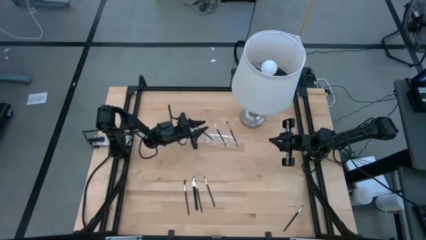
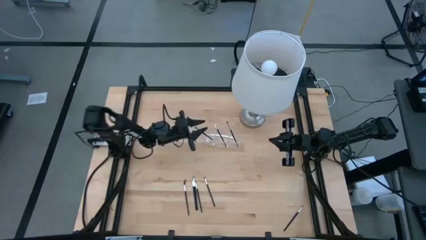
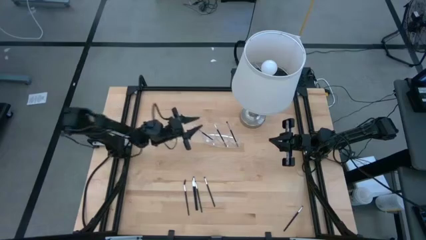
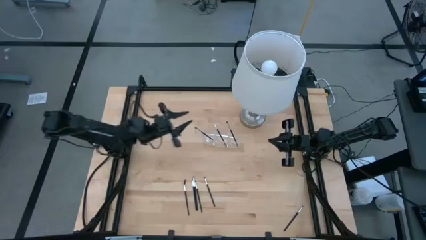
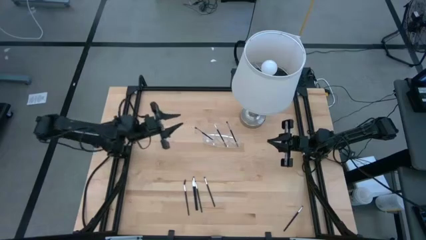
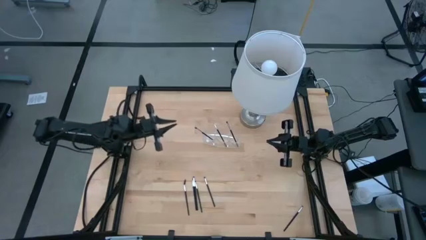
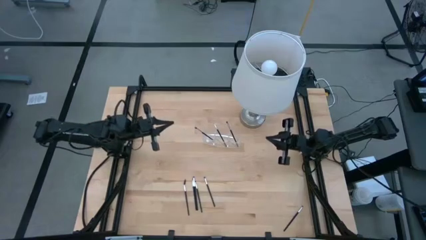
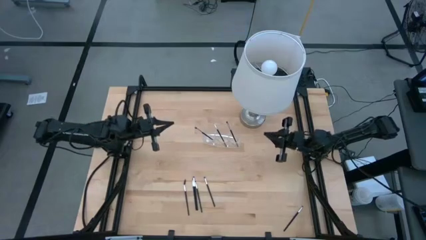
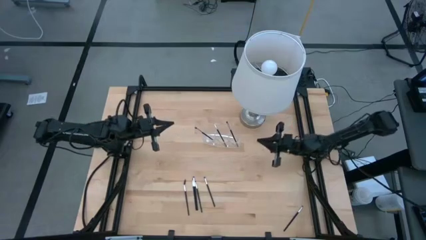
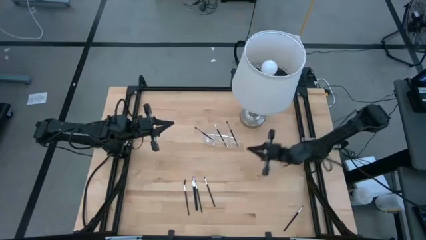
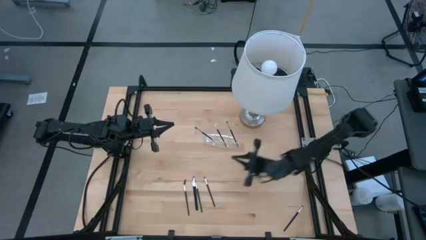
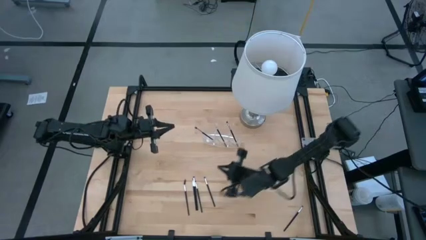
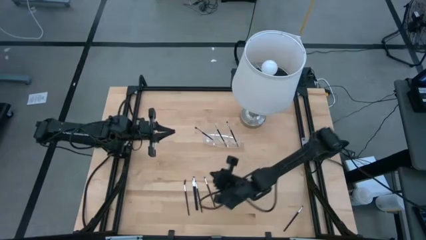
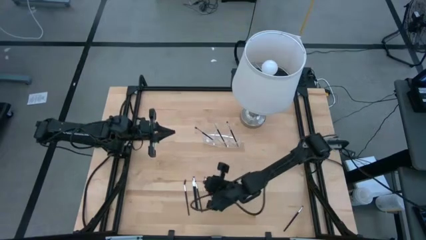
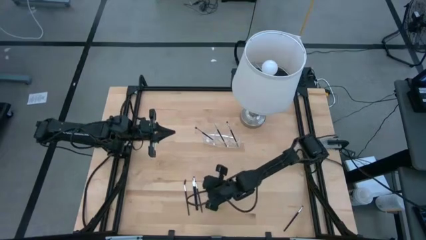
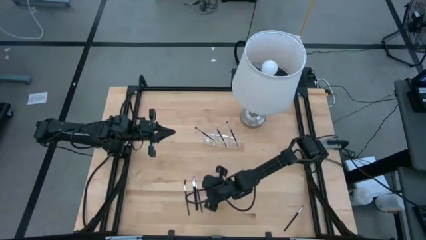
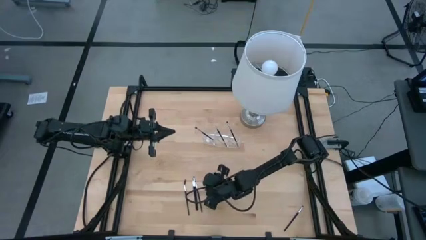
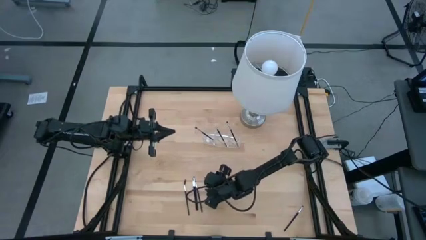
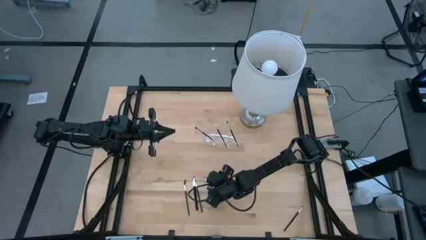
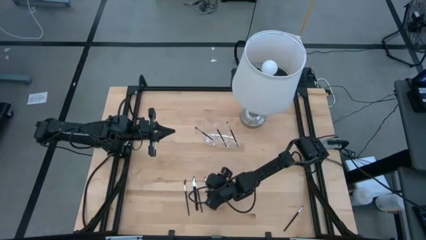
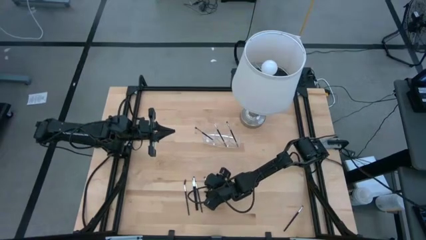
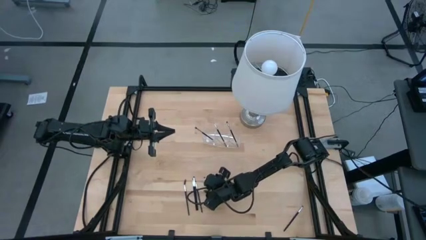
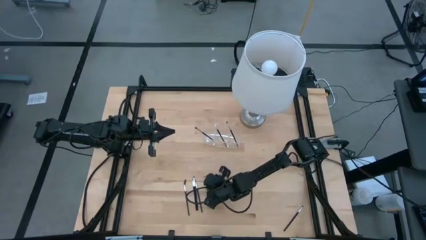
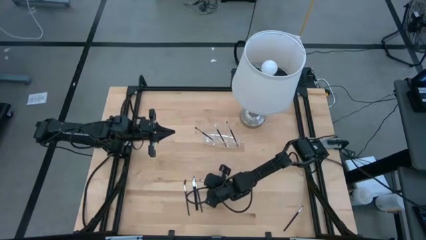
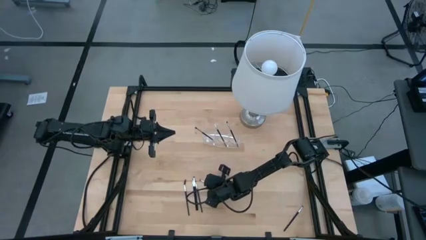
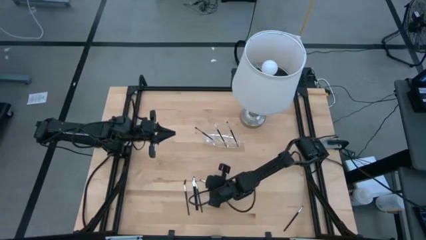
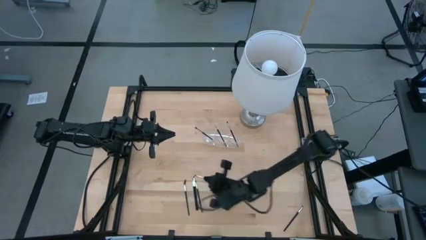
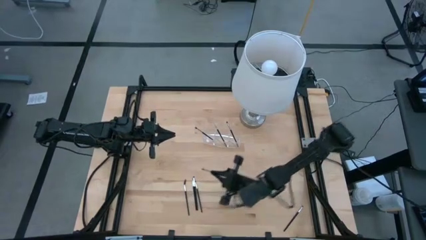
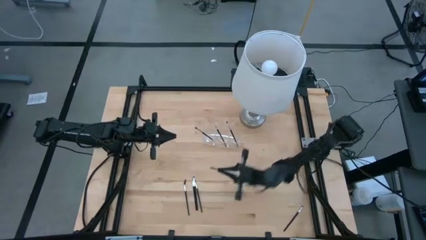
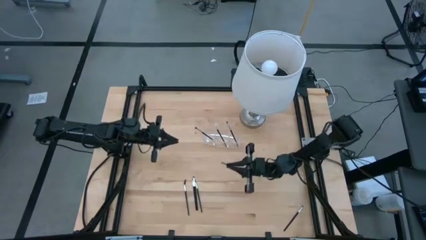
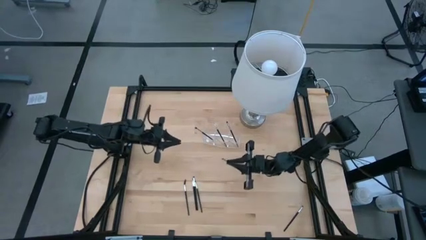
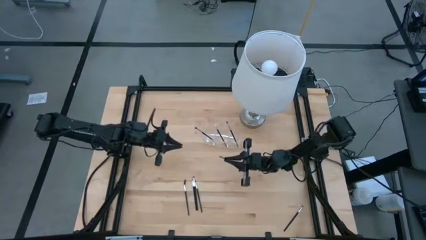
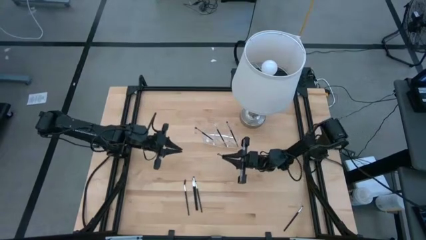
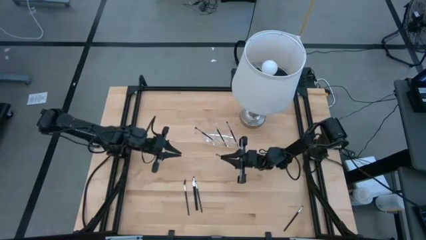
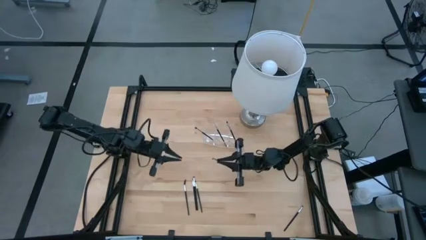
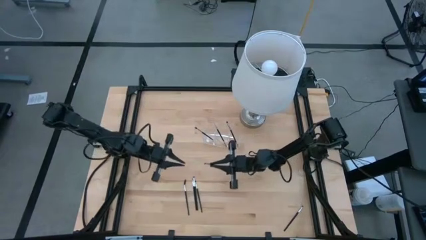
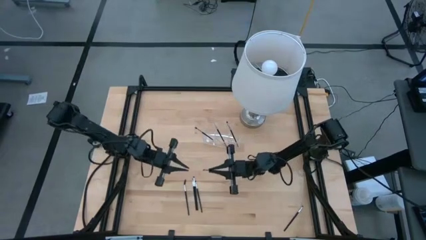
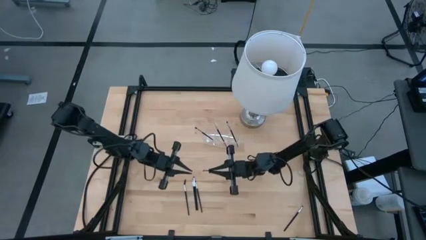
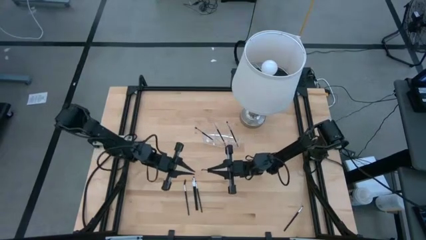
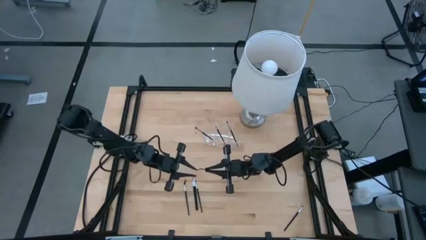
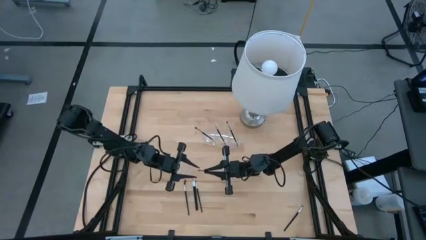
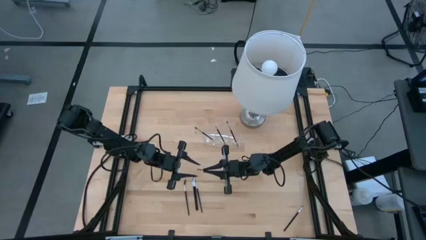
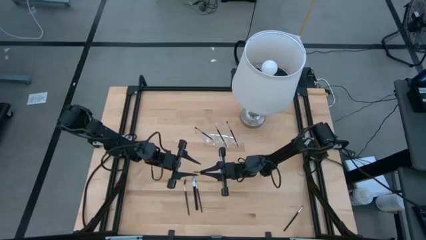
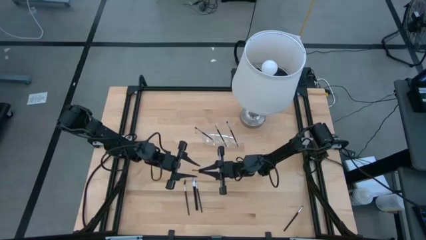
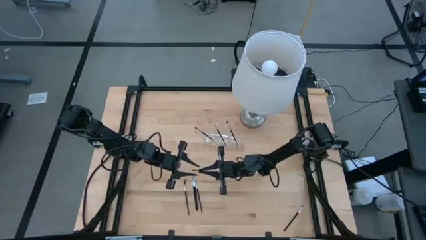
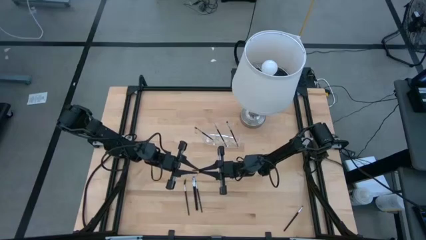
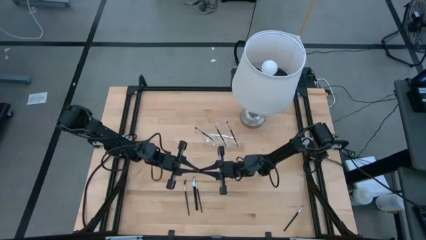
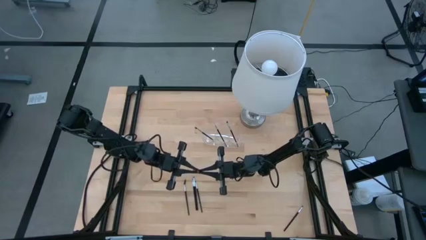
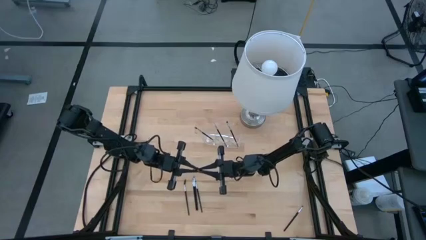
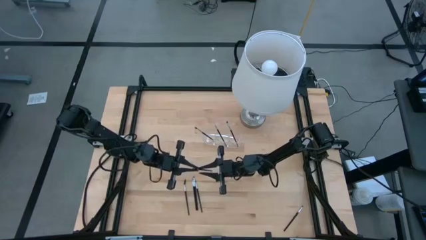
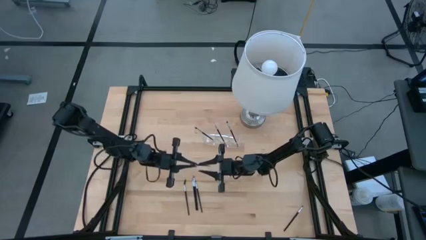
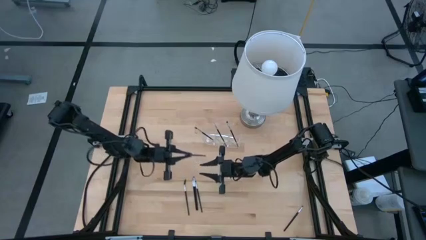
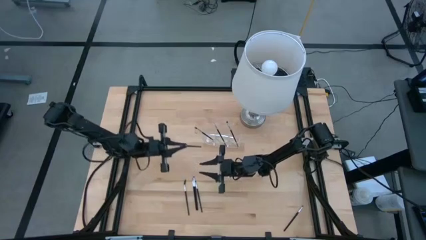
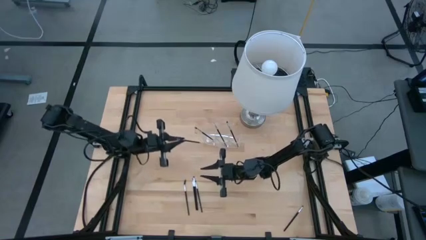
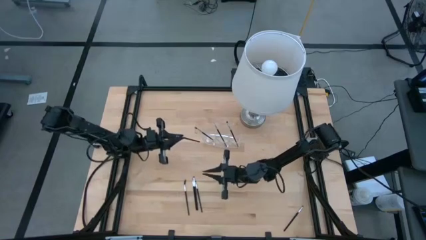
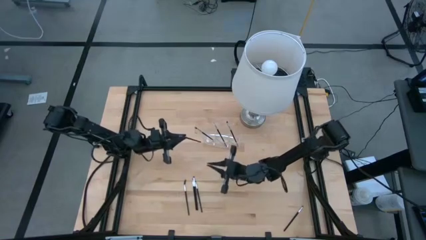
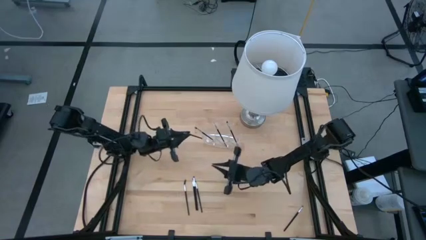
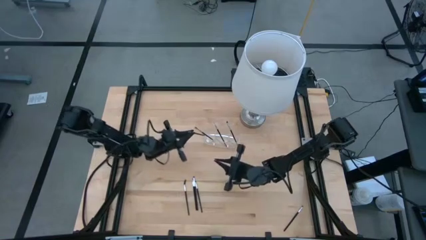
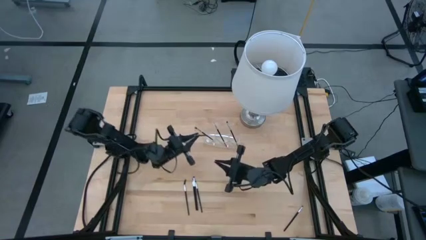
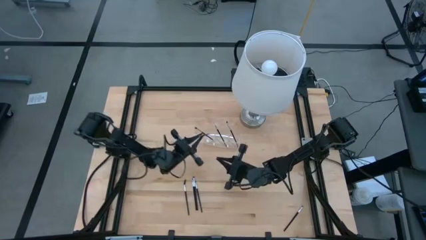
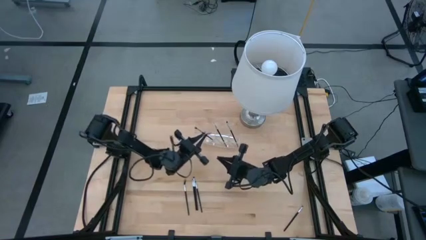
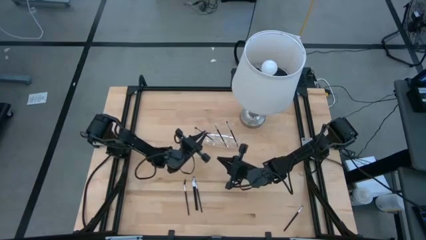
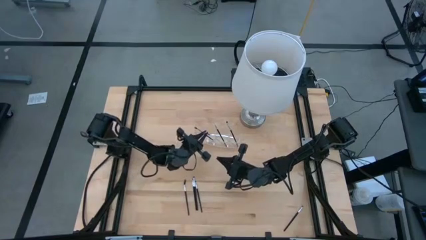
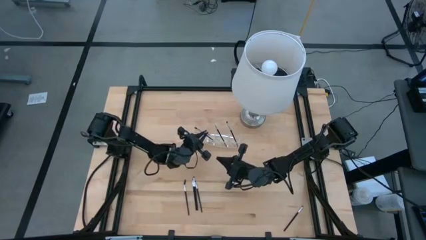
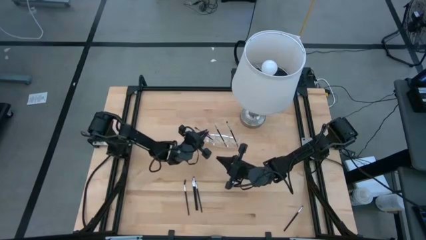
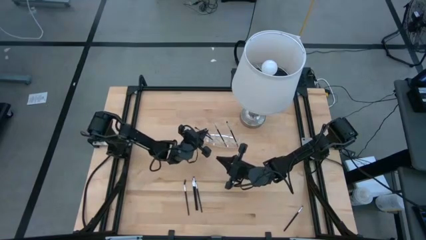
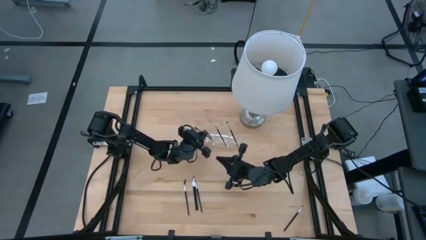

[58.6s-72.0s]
Task: Pick & Place Makeup Brushes
Put the black eyeshadow brush into the transparent organizer

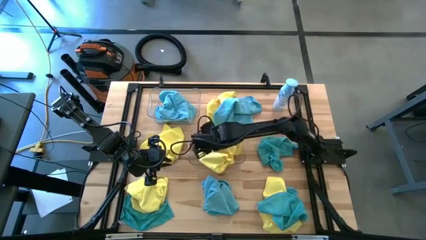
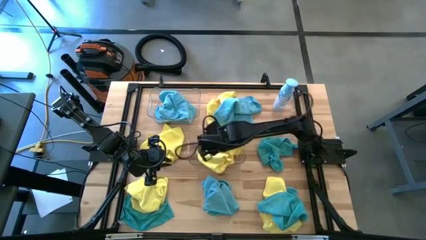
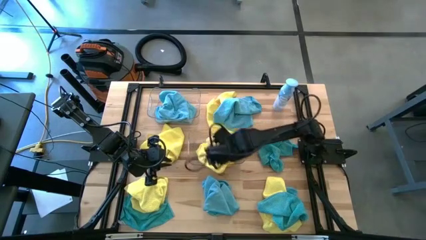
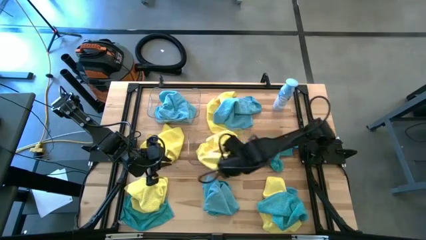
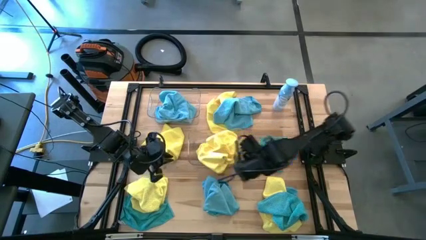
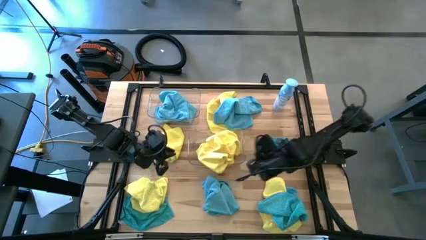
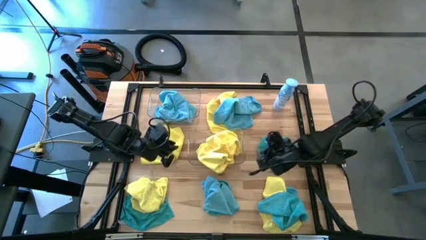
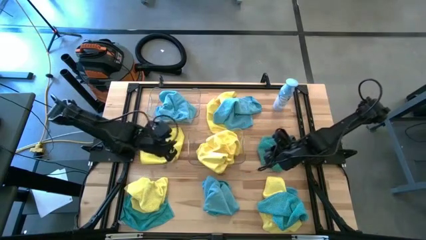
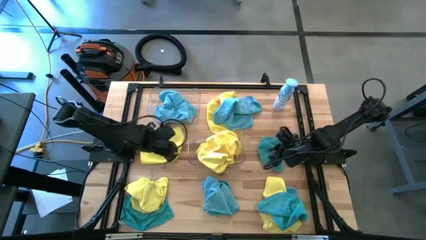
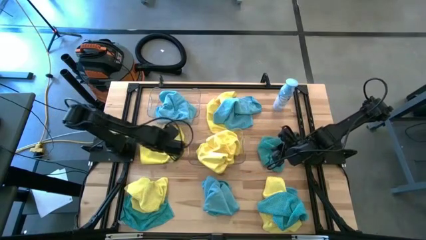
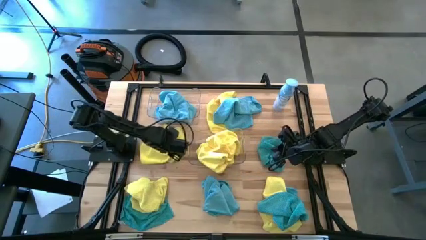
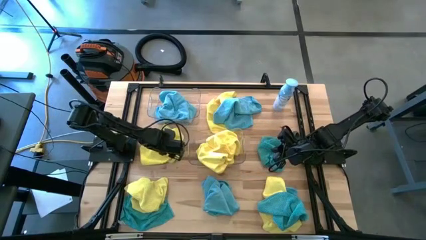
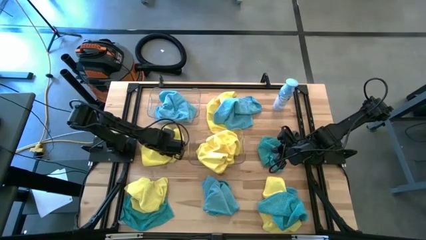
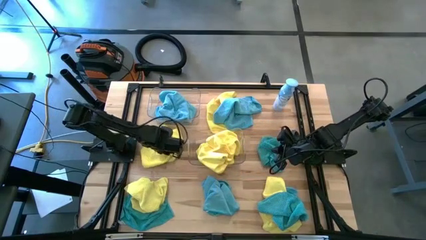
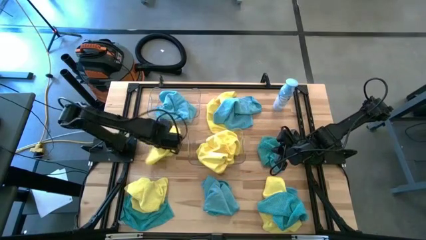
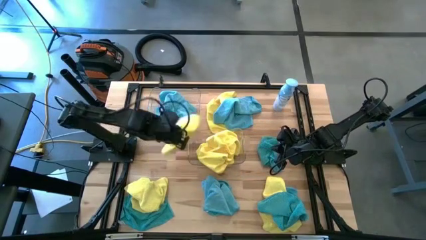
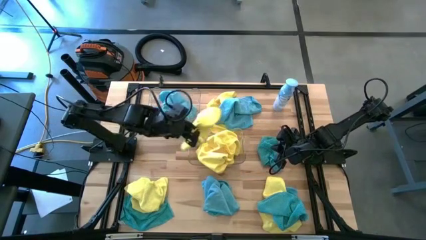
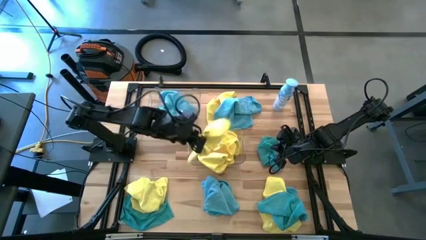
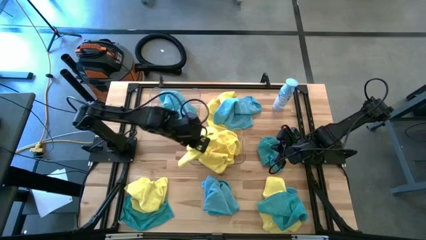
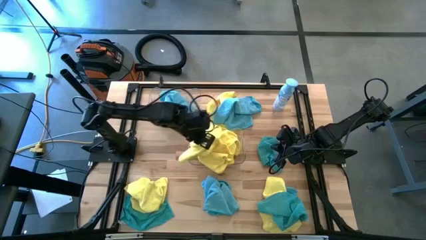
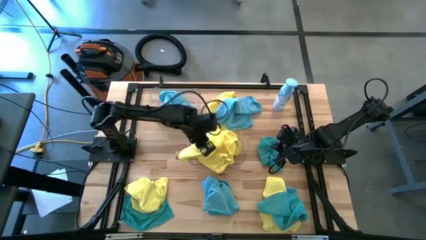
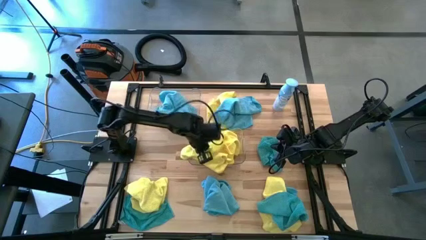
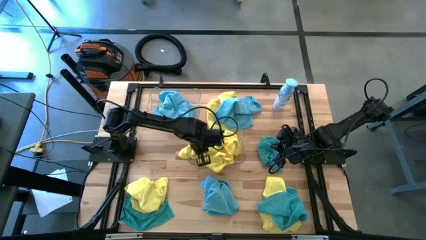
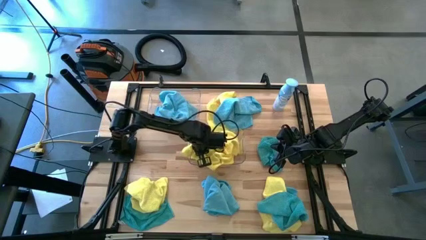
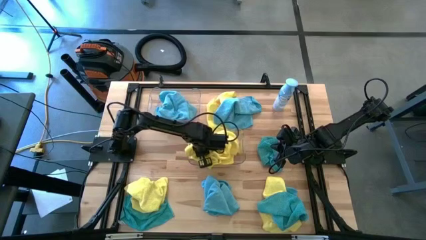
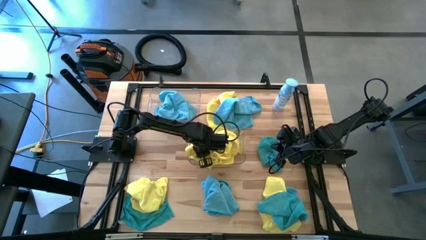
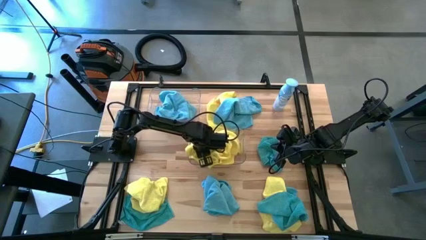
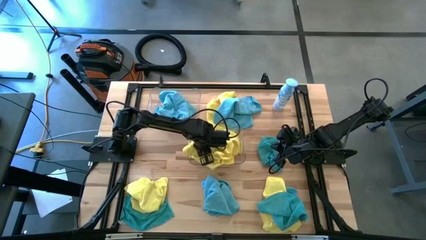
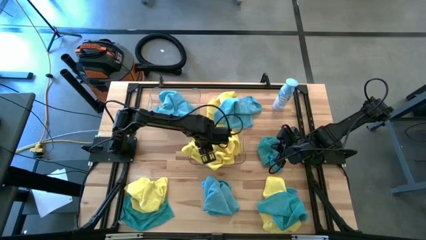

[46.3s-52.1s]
Task: Sort microfiber towel by color & place in baskets
Put the yellow towel into the bottom transparent bin
